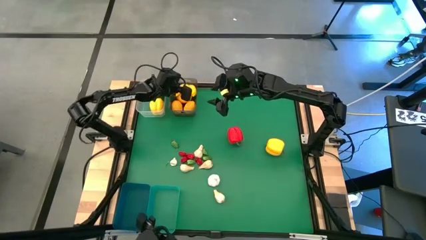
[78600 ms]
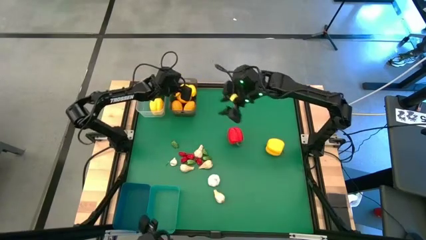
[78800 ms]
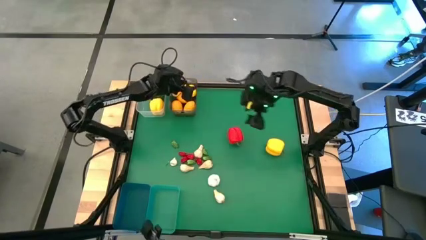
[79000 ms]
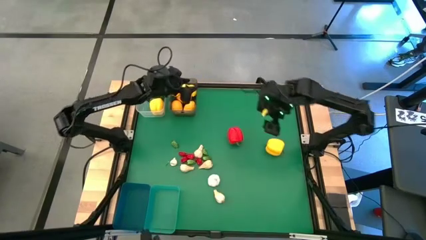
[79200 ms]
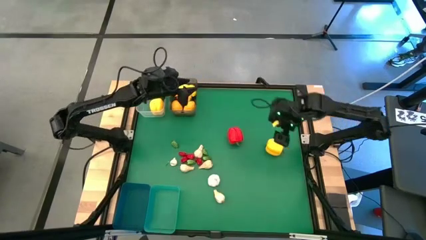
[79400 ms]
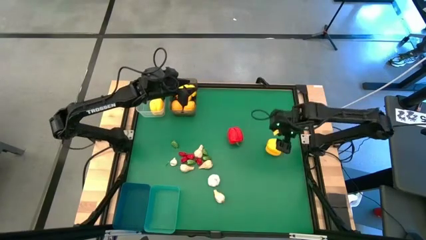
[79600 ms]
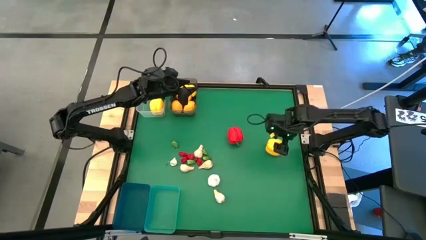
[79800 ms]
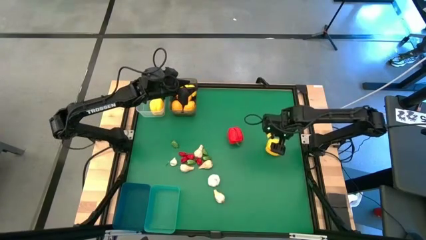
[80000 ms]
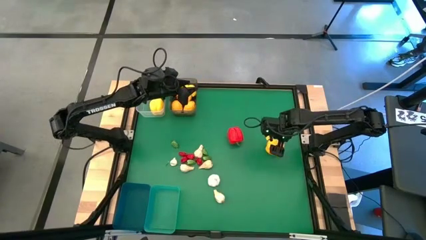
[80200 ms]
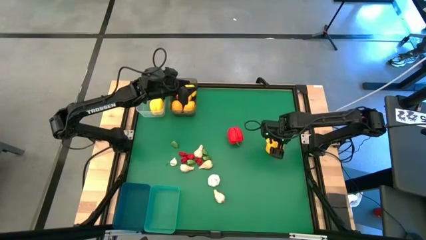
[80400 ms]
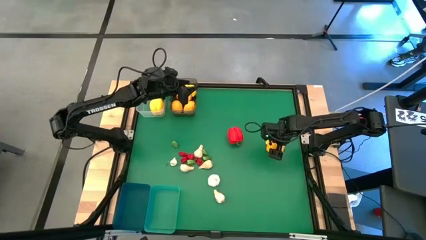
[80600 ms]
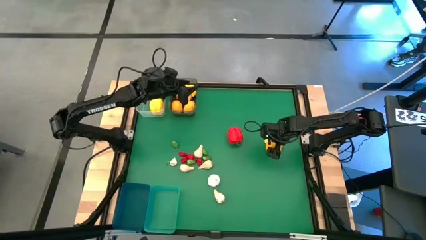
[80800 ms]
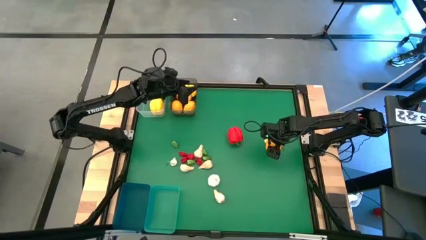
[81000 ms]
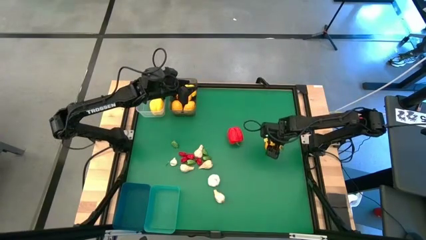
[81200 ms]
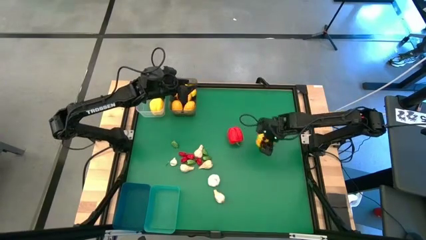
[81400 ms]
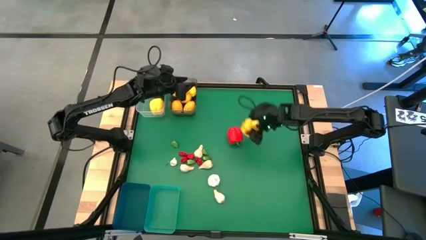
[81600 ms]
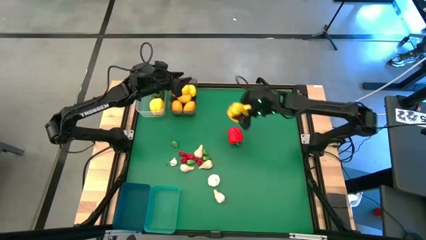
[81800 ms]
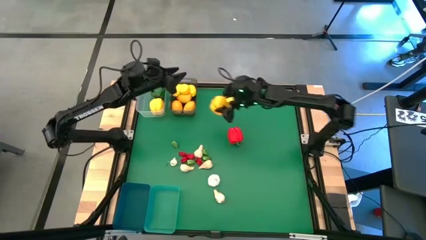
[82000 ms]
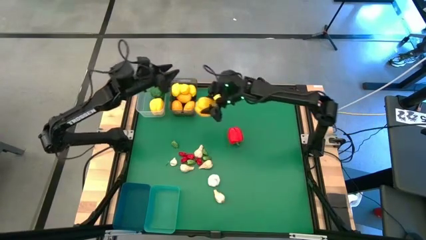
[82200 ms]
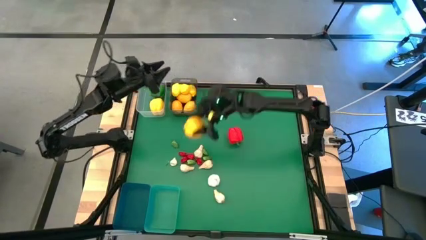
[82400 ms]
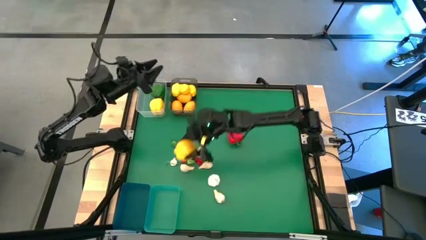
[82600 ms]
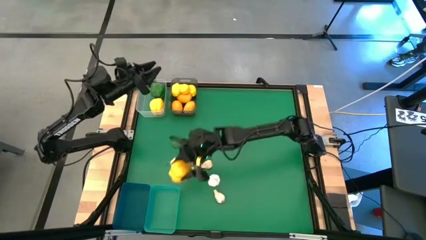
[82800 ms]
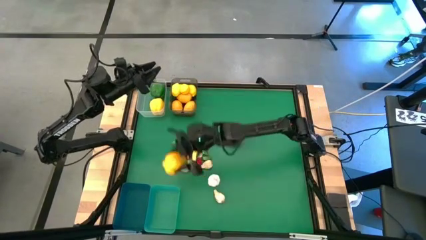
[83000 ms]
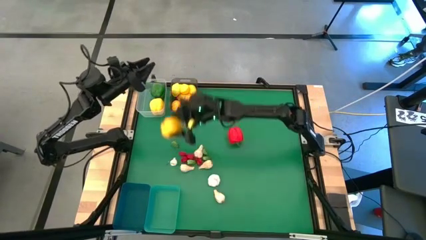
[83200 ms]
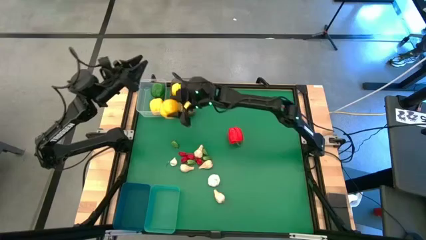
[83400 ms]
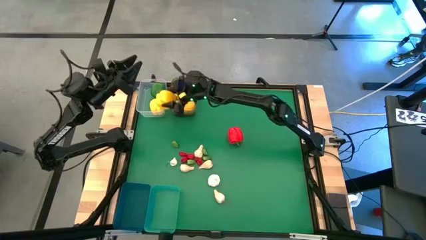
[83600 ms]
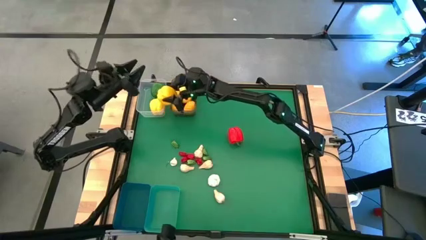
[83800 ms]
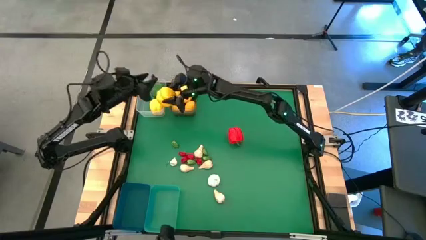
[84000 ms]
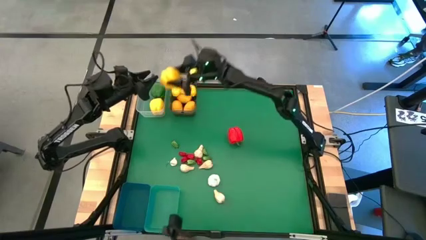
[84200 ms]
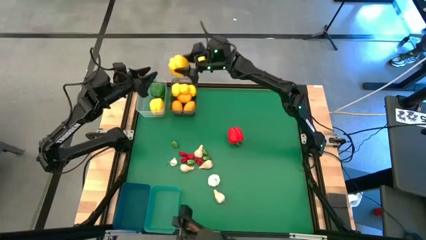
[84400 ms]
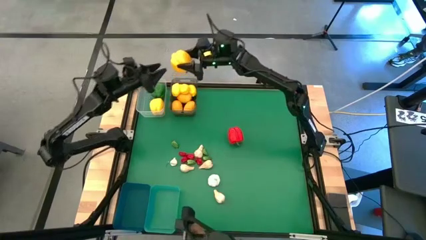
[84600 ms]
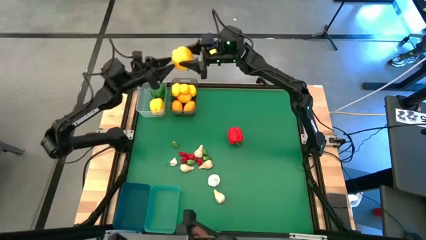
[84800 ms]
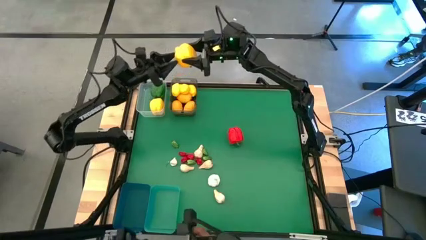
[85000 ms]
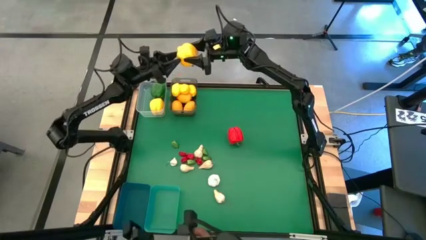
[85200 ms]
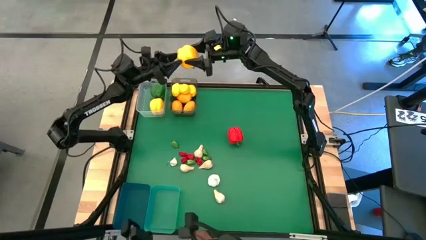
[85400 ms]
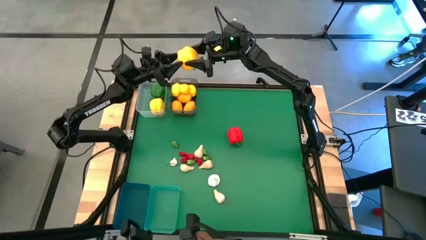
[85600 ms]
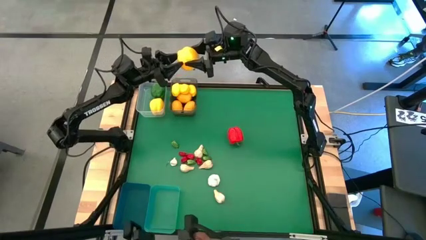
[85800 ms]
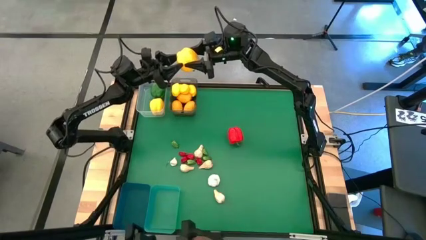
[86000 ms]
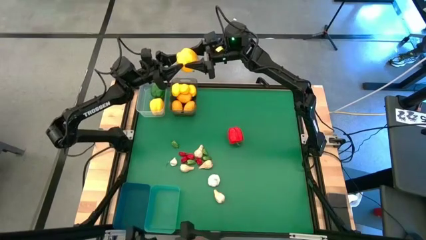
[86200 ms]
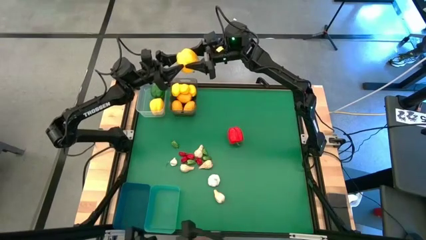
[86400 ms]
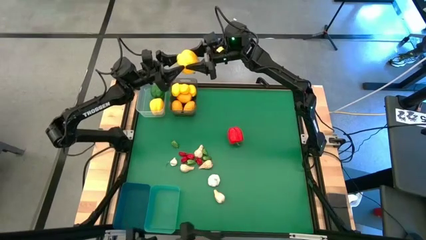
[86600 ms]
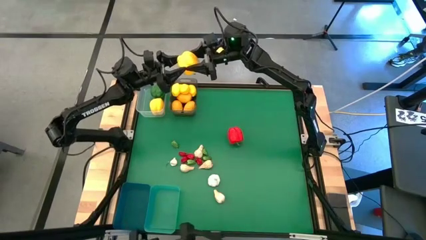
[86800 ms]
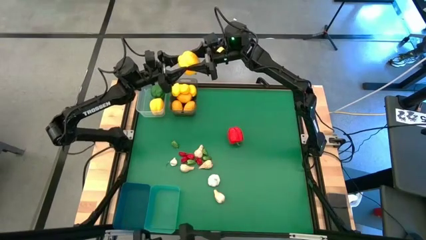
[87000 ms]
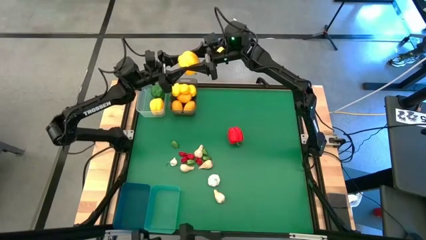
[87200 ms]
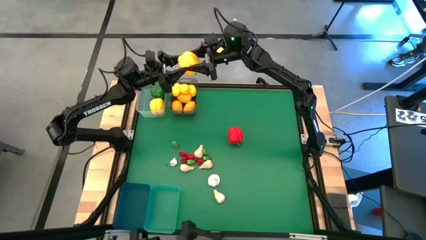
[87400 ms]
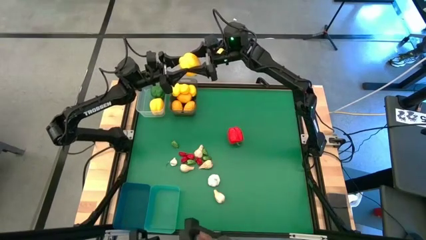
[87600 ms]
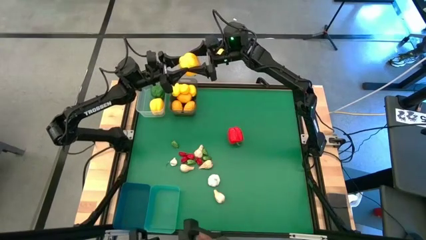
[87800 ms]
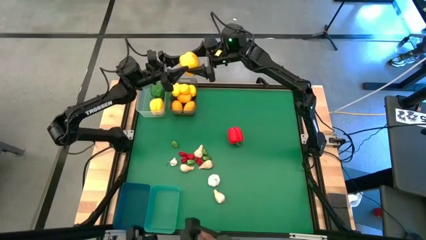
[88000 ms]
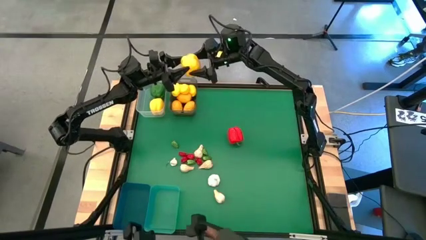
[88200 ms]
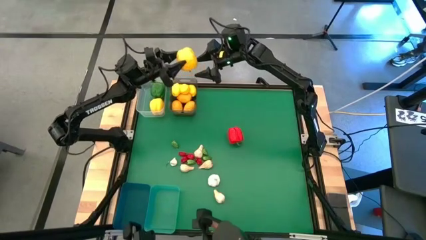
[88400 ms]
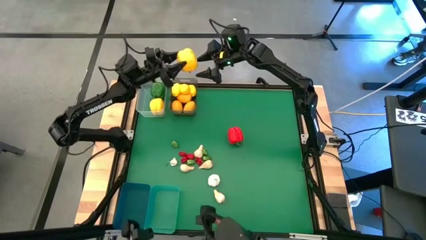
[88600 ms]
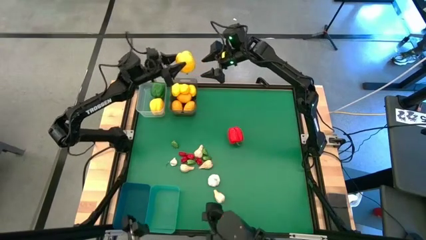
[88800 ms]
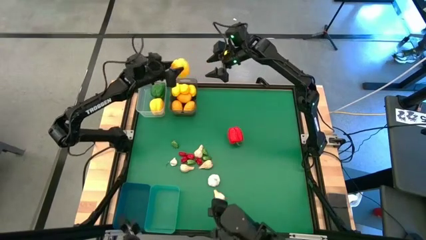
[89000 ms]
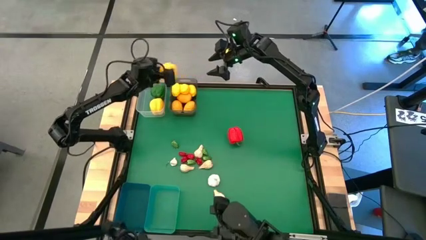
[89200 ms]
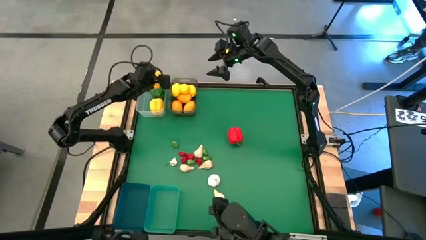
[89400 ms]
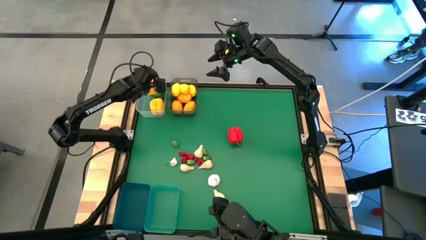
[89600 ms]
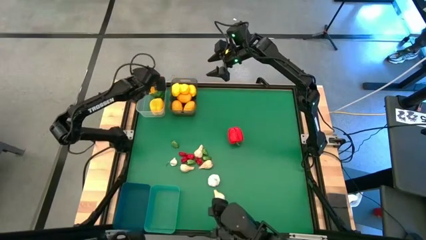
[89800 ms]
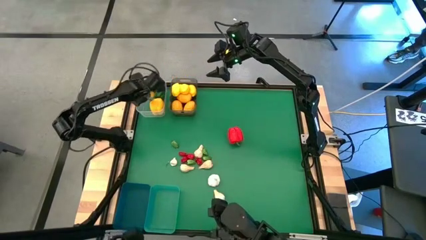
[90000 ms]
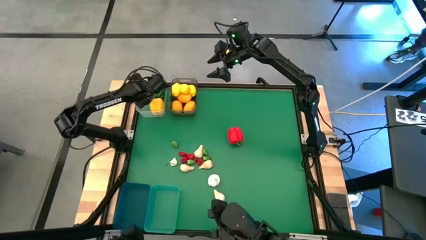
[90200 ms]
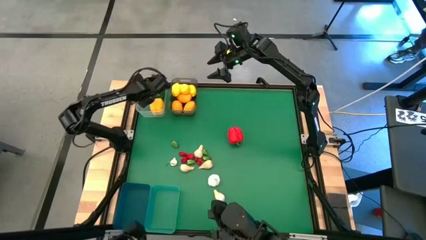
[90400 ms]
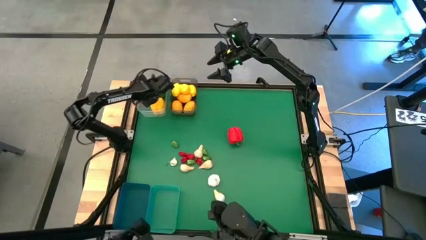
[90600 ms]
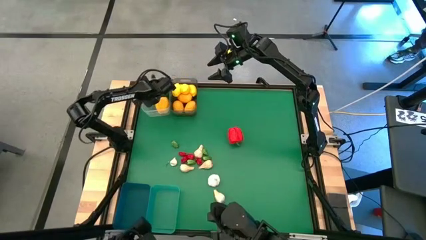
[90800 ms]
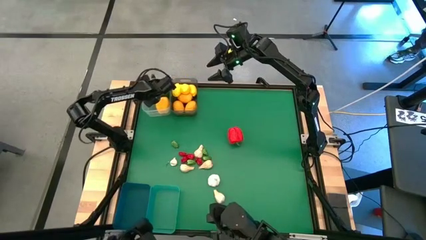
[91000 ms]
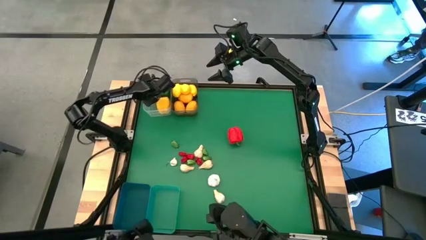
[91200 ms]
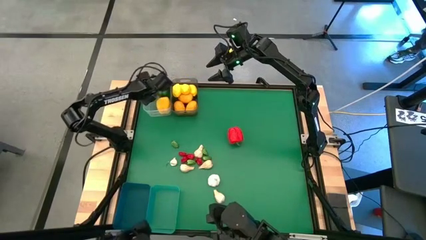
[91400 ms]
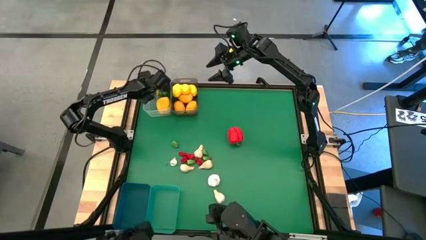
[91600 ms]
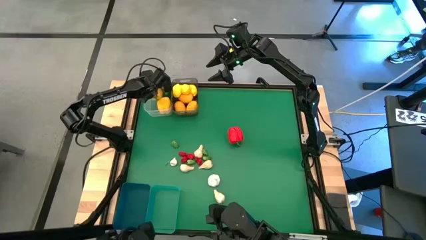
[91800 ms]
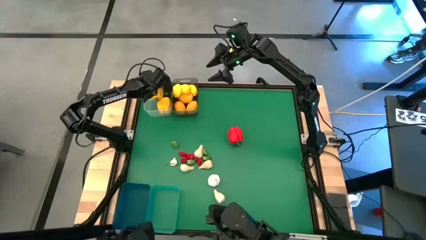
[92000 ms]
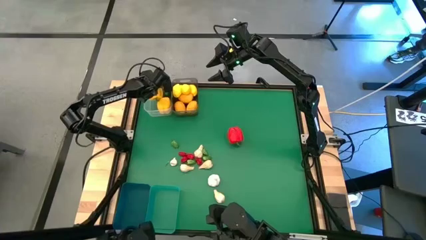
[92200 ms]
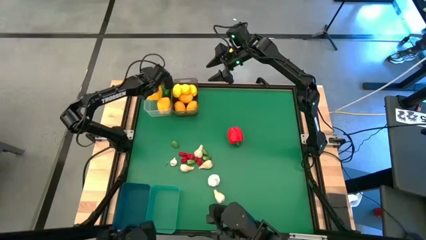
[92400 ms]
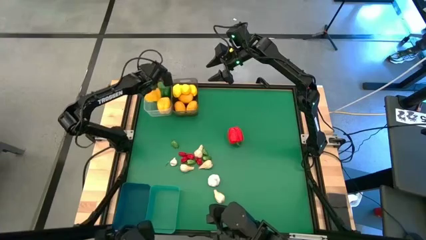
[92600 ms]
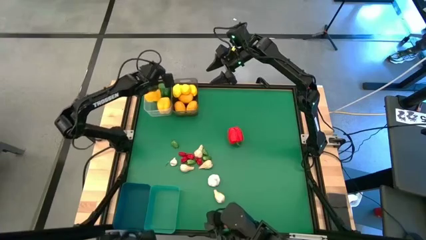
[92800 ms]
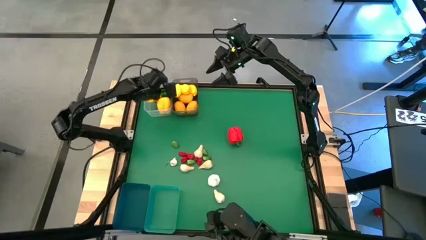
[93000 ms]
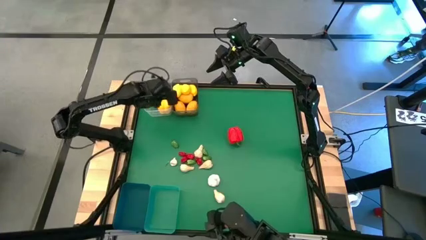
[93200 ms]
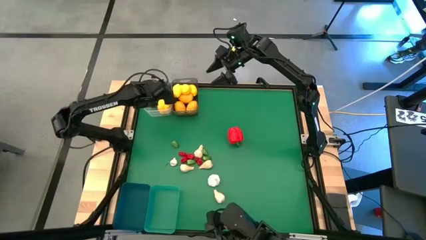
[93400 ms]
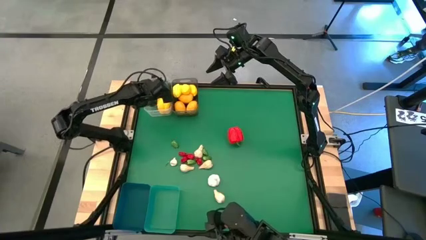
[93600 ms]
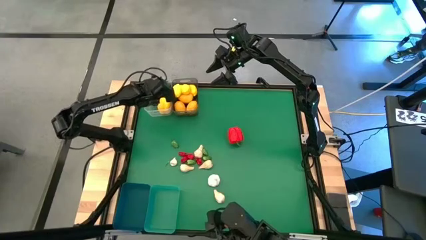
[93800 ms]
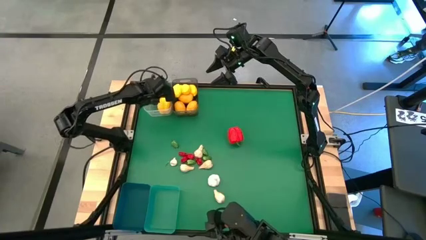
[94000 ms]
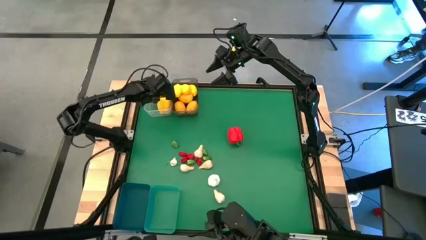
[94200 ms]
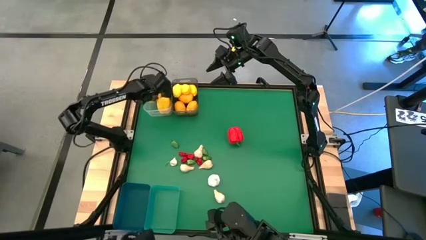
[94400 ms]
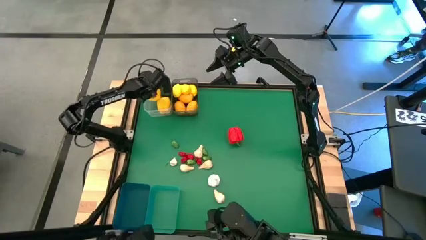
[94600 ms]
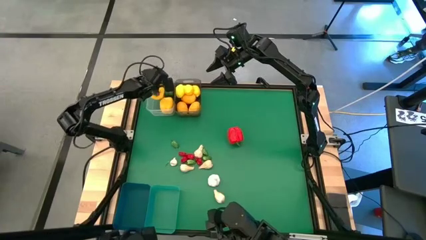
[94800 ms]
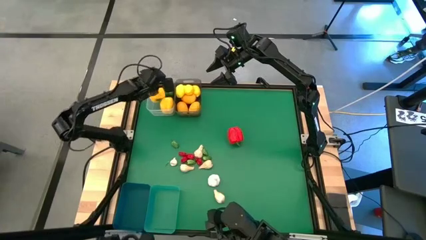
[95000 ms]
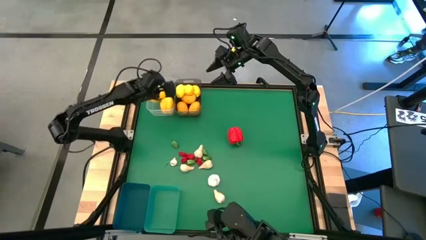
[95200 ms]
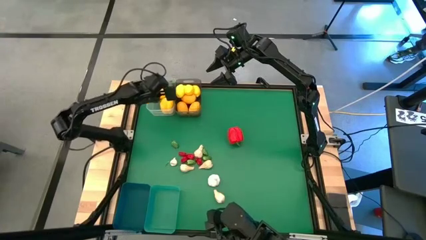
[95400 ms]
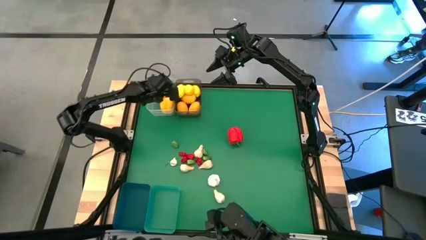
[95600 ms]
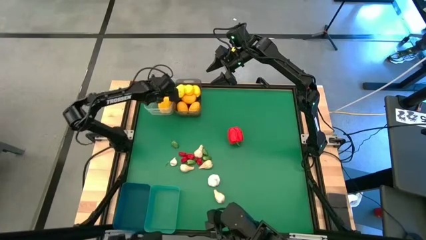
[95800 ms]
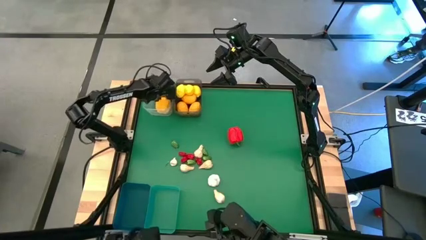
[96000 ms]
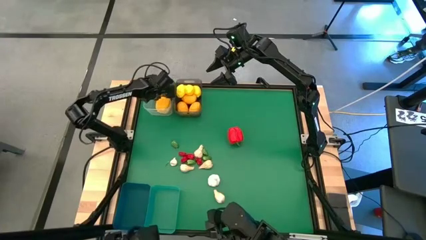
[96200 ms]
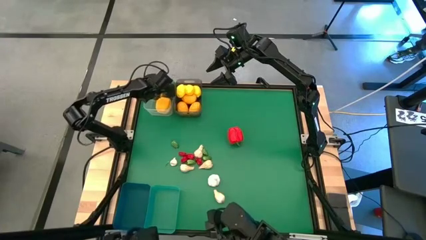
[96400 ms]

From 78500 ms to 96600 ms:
Task: Sort produce into baskets
Put the yellow bell pepper into the transparent bin
